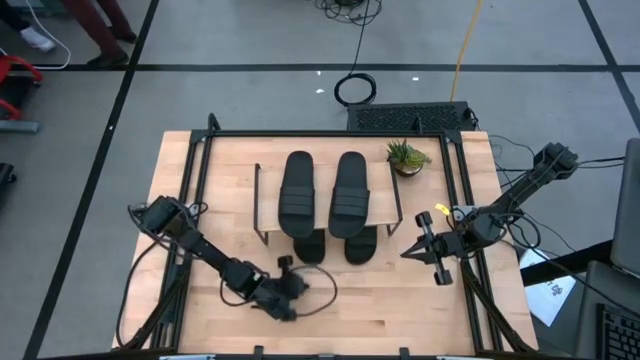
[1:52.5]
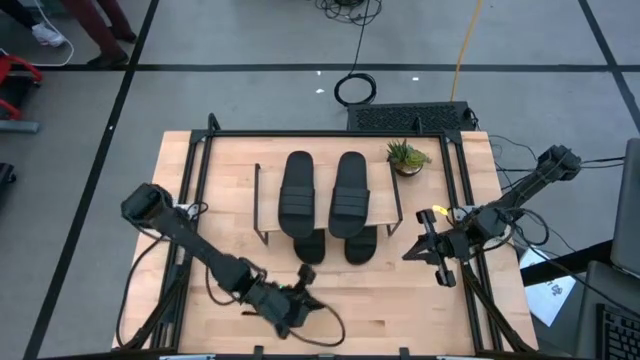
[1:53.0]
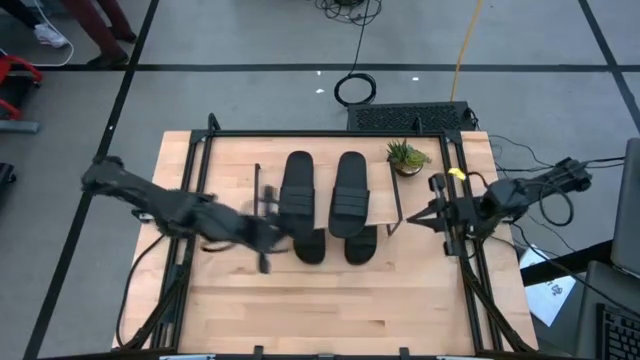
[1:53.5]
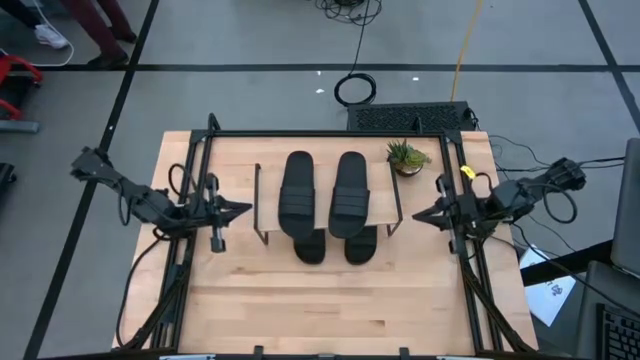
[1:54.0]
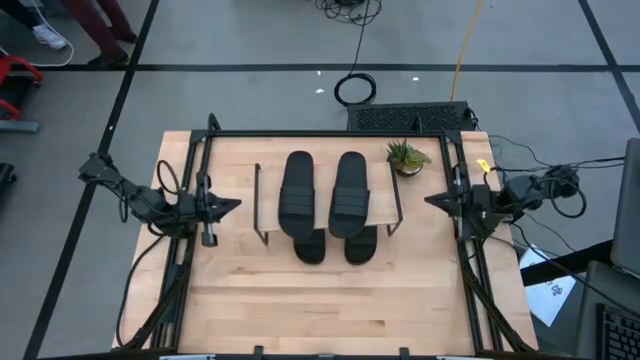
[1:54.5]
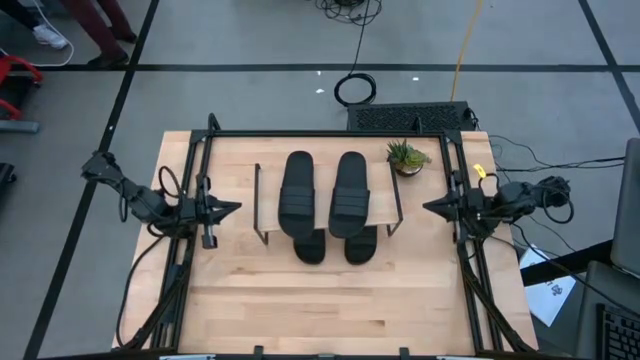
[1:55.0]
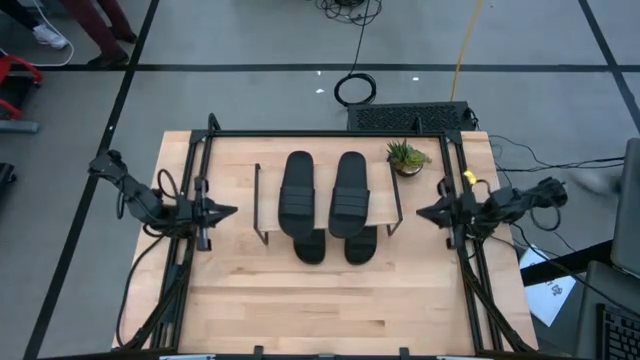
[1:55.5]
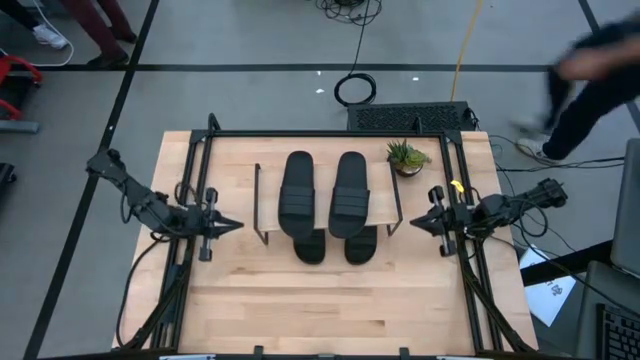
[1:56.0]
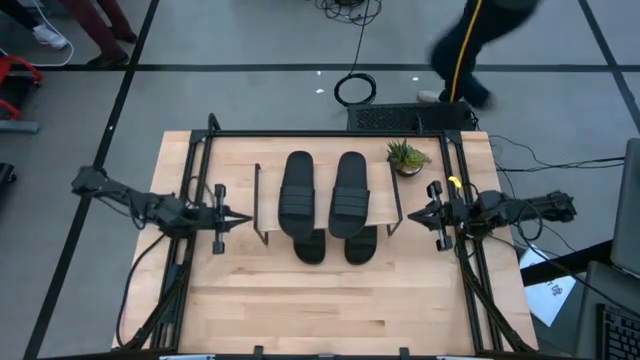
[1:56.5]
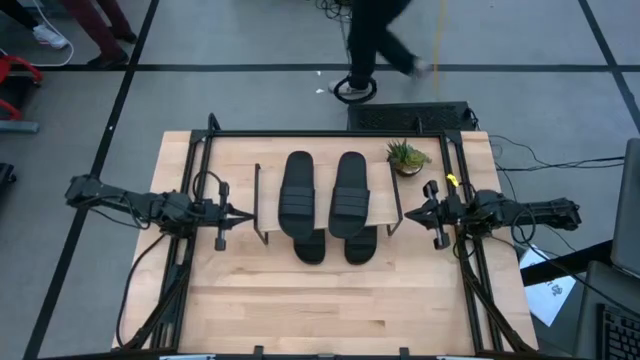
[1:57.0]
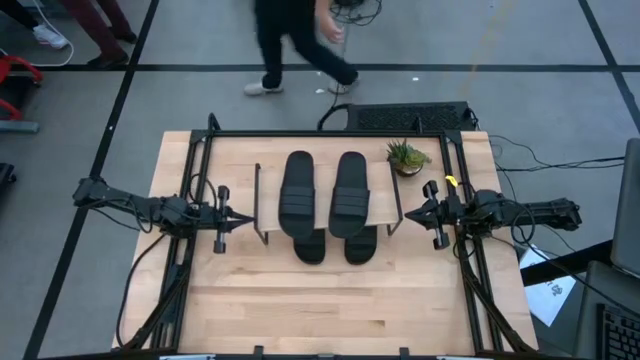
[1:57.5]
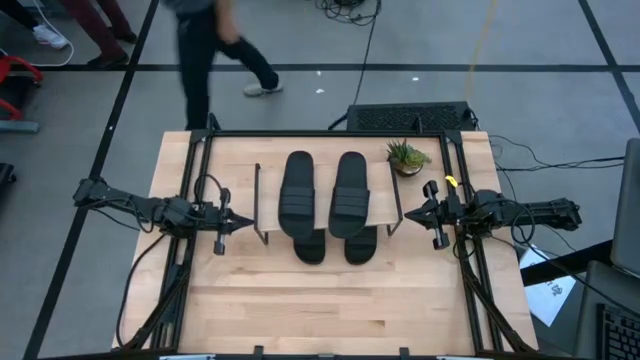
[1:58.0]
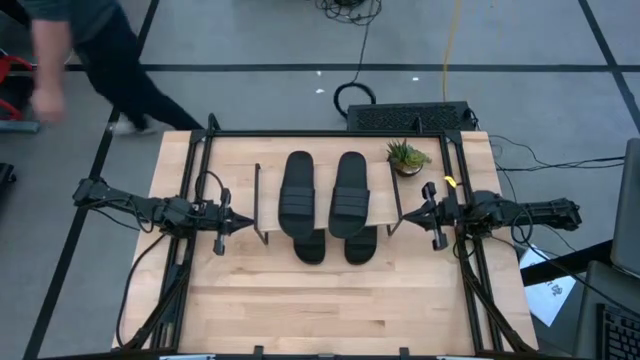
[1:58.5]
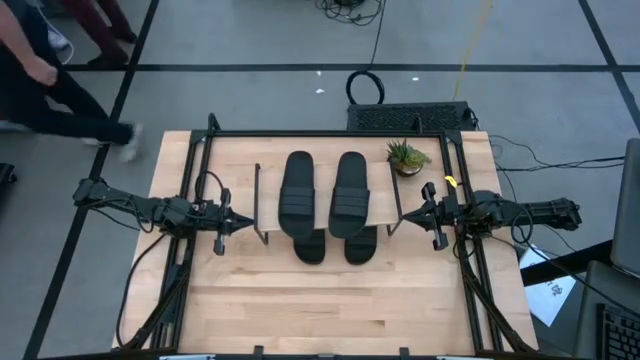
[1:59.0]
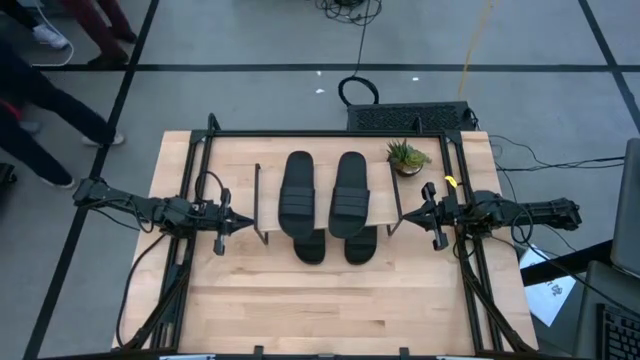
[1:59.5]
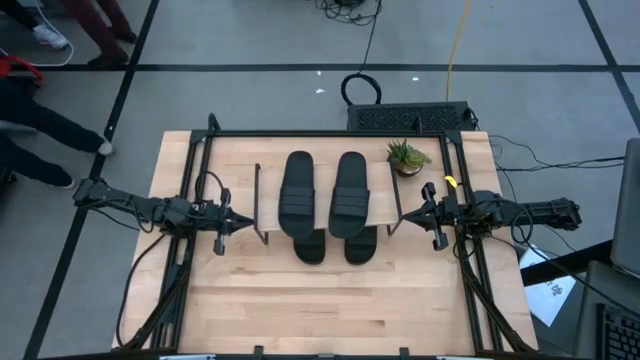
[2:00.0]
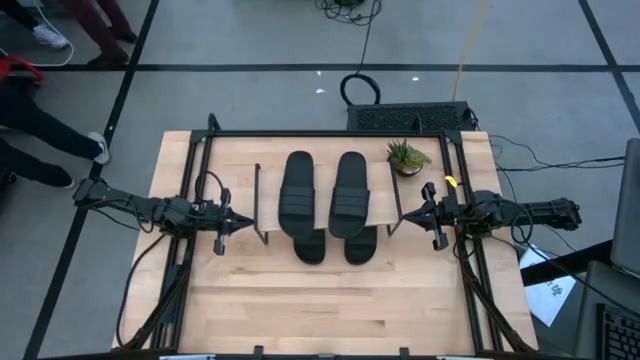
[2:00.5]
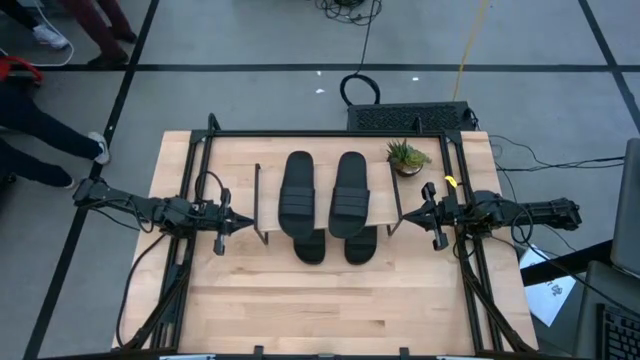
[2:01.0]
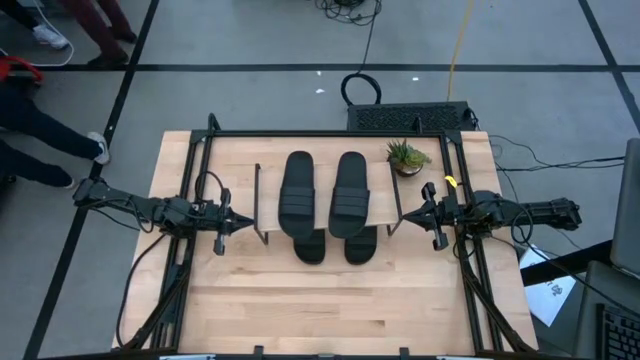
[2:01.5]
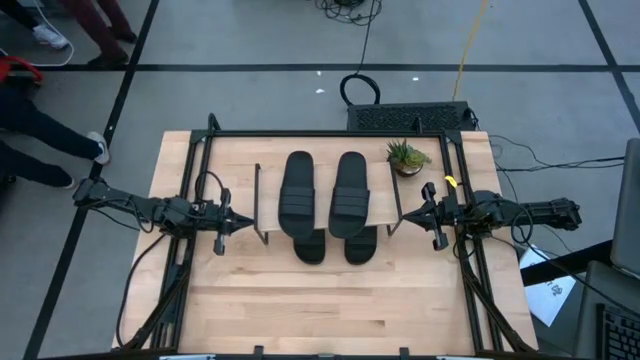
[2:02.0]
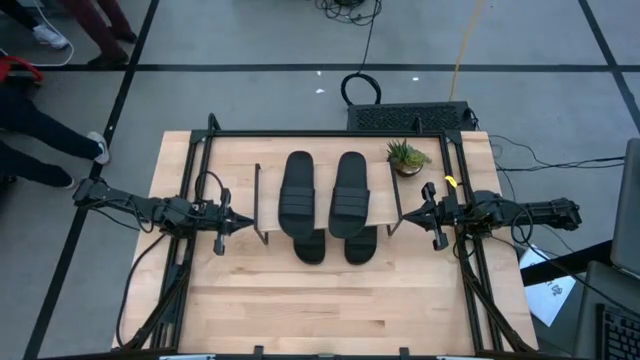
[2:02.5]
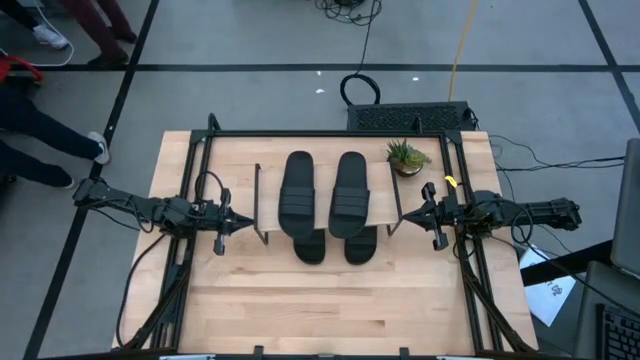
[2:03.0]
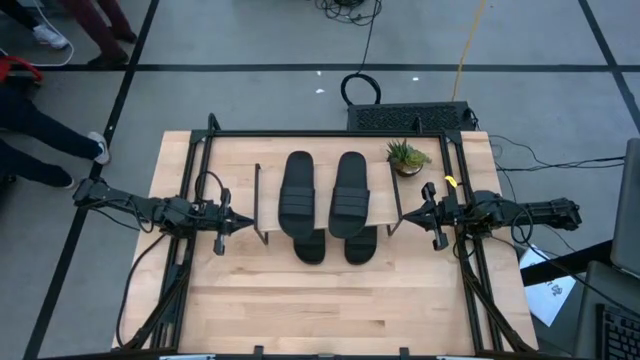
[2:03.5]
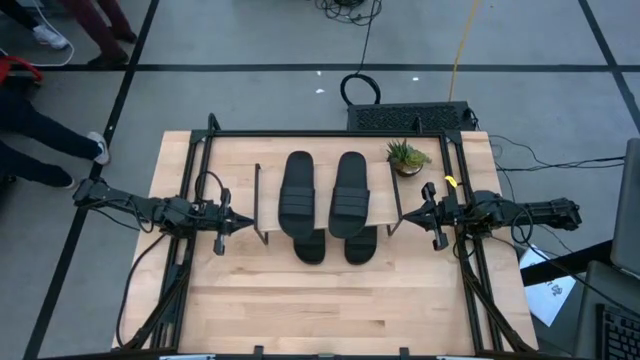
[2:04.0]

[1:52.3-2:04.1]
Task: Pick and place slides into the shelf
Return to Home Position

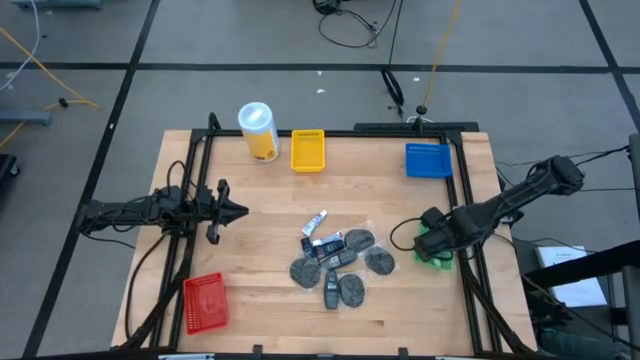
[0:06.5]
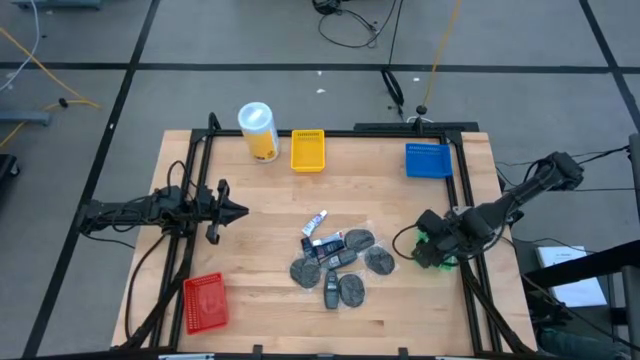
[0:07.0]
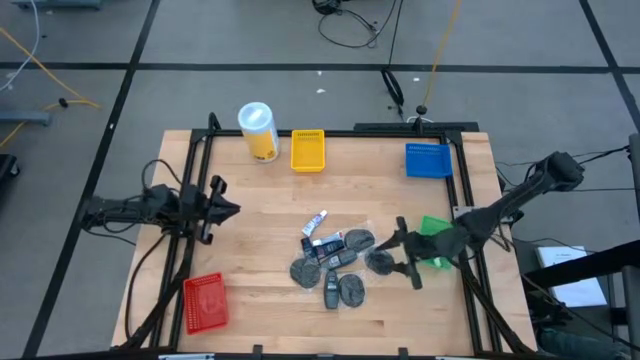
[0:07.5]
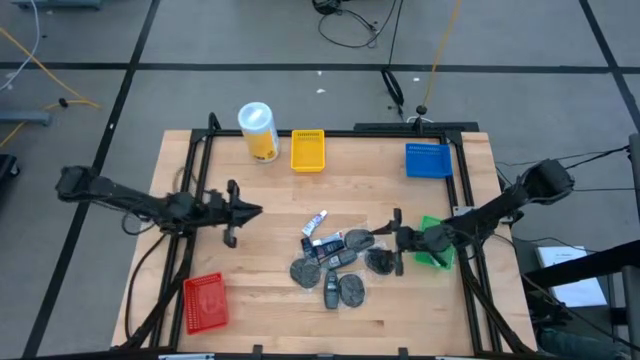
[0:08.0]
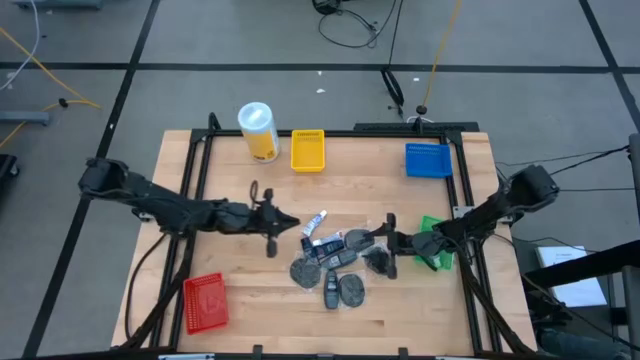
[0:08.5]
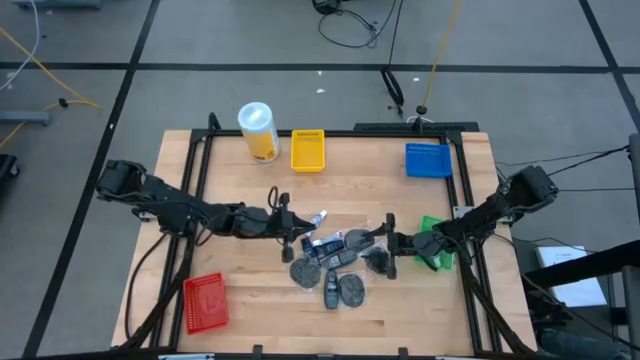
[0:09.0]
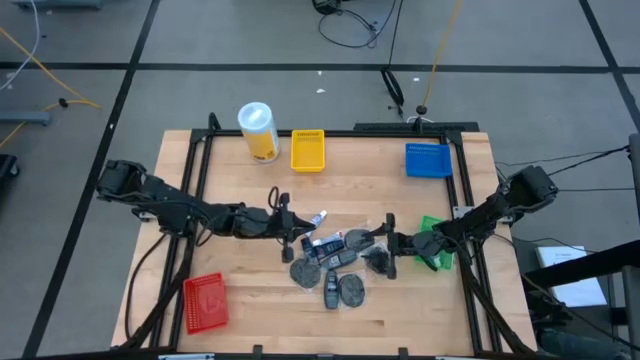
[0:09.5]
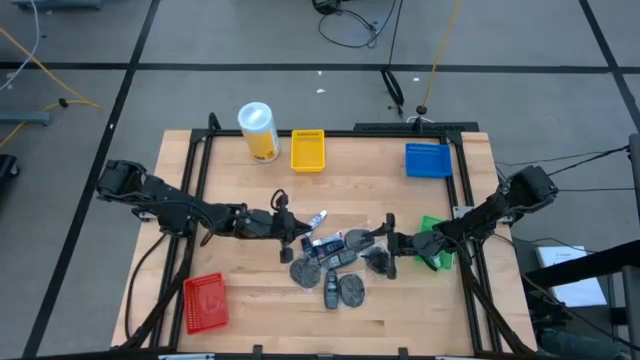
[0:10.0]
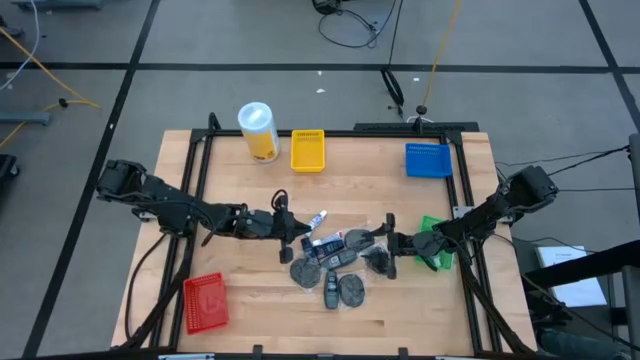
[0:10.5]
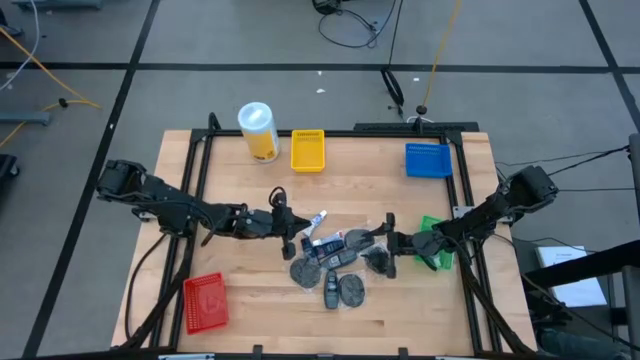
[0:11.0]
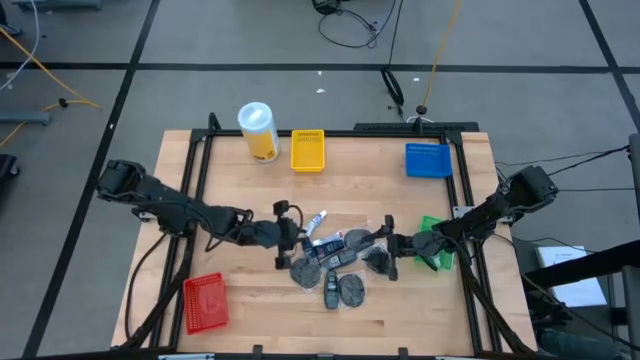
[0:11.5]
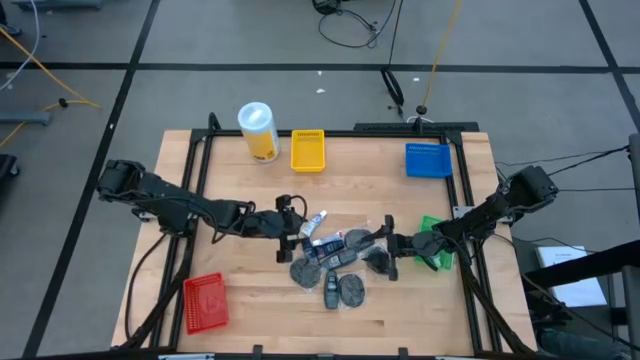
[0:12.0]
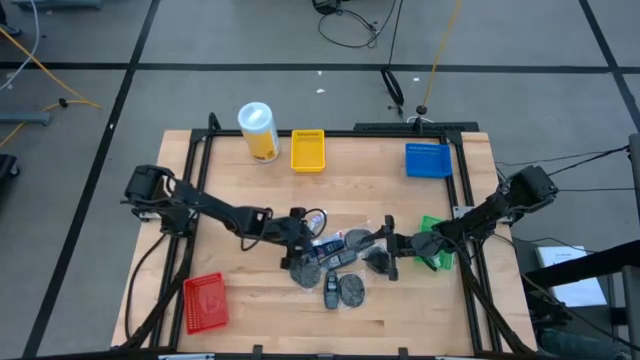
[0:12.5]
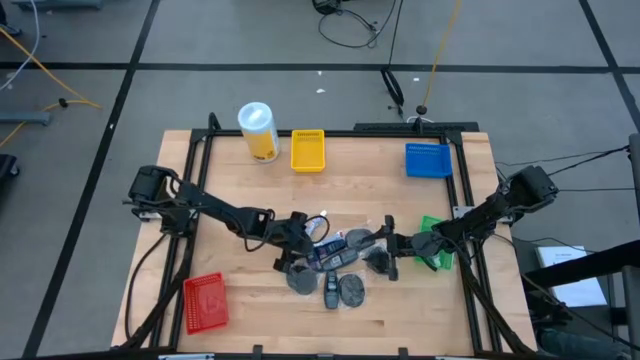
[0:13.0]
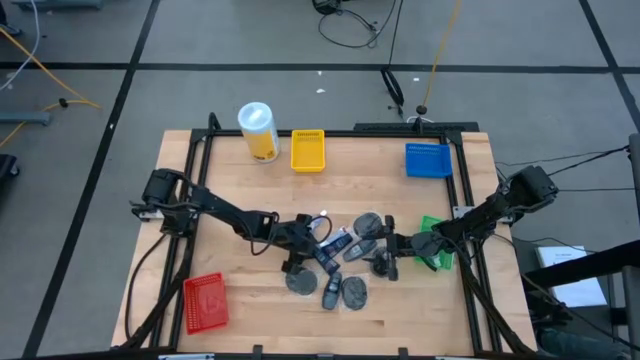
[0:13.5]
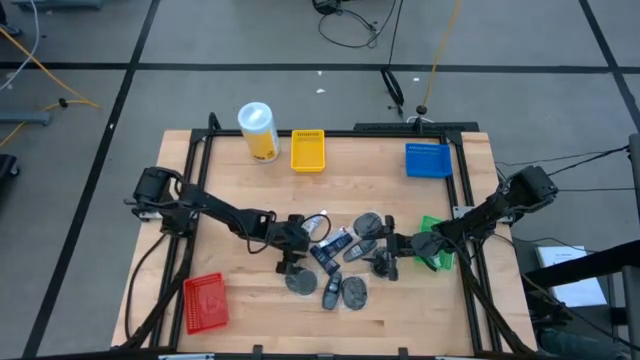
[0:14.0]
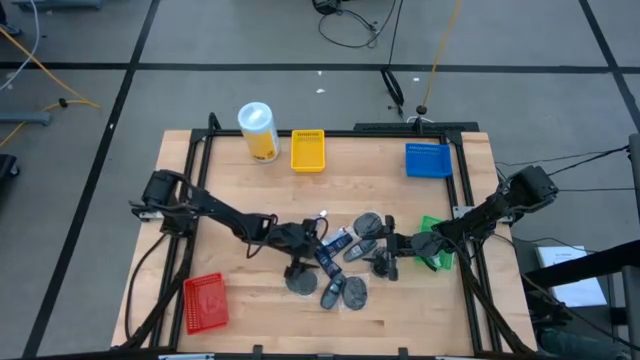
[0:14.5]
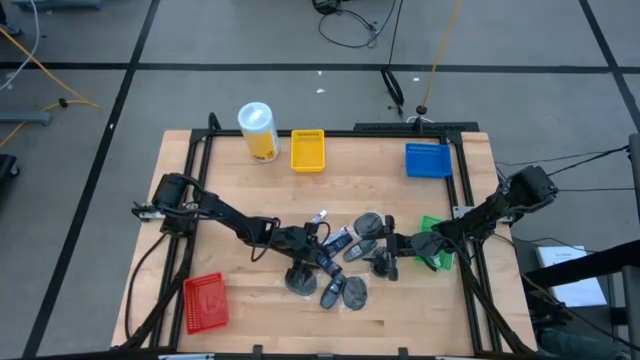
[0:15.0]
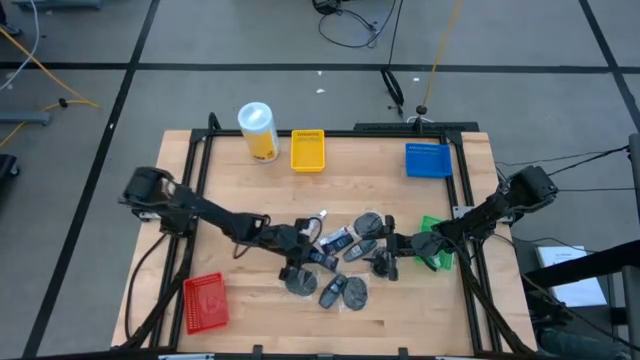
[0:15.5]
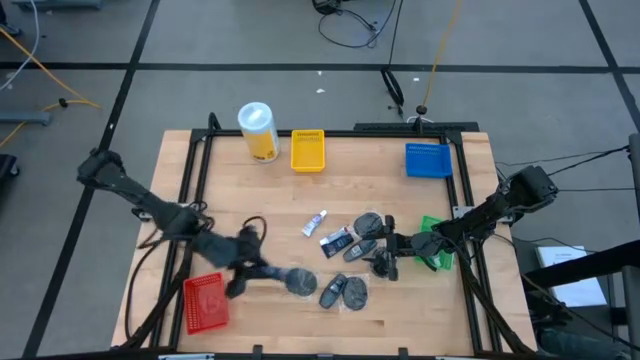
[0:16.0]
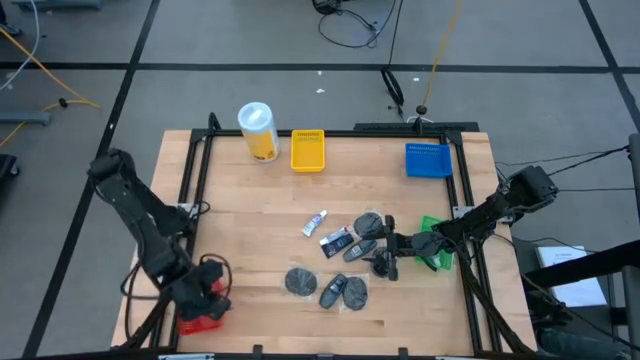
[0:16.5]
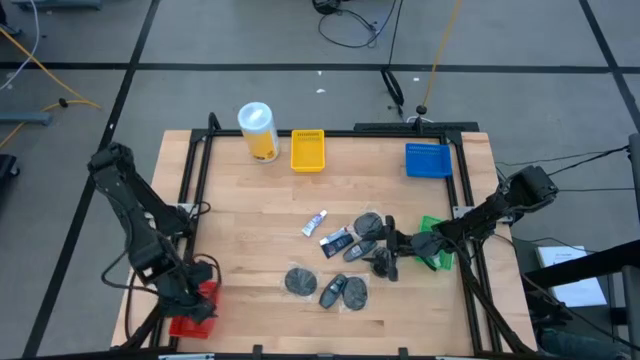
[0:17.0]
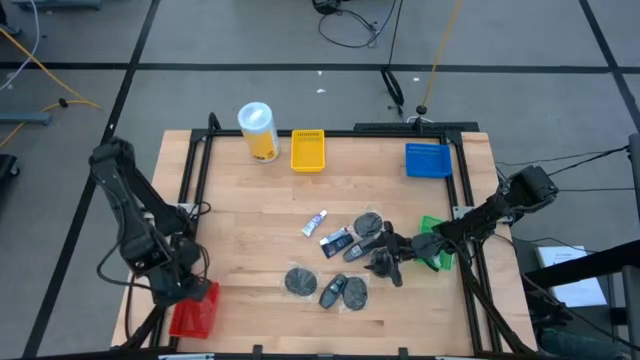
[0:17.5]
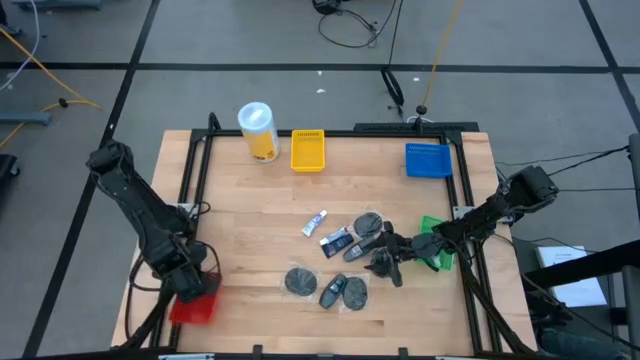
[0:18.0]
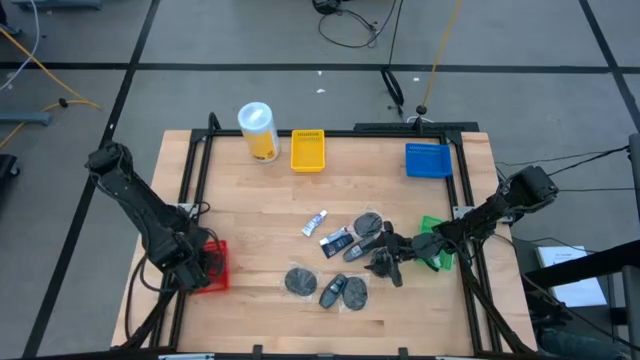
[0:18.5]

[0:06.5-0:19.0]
Task: Pick & Place Travel size toiletries
Put the shaving cream into the red bin
